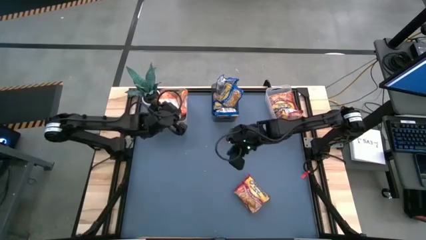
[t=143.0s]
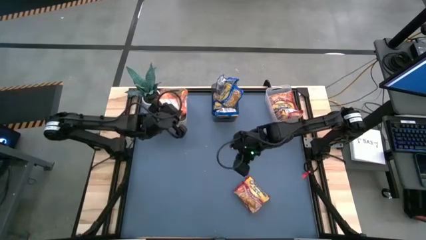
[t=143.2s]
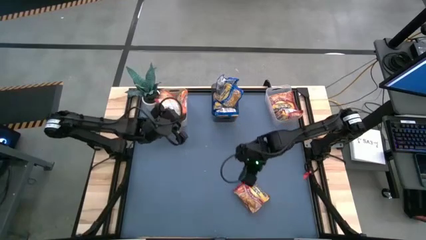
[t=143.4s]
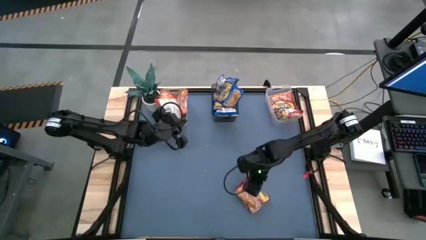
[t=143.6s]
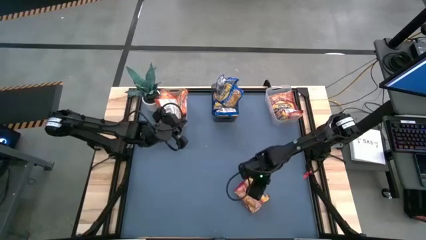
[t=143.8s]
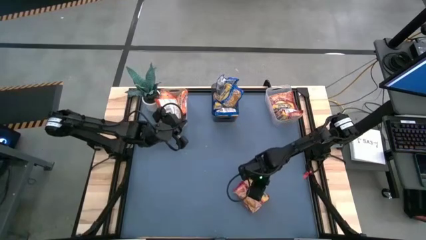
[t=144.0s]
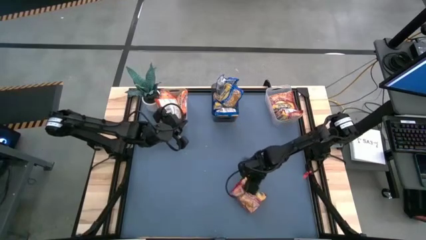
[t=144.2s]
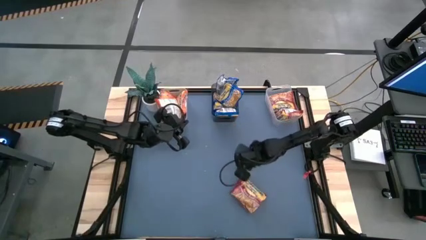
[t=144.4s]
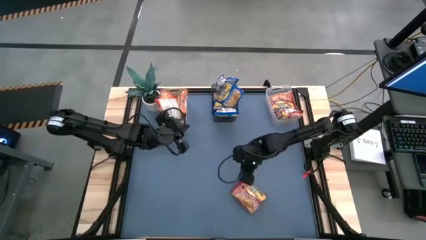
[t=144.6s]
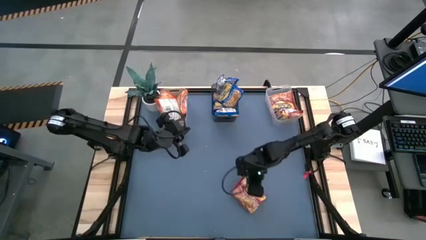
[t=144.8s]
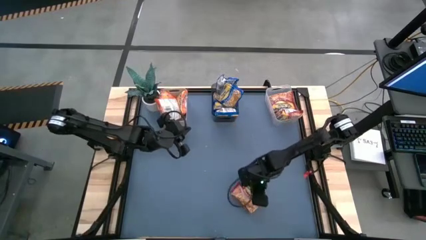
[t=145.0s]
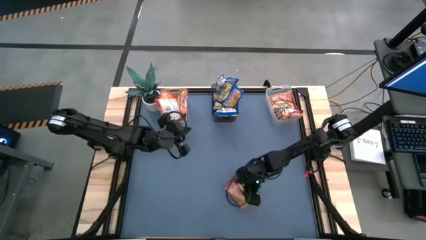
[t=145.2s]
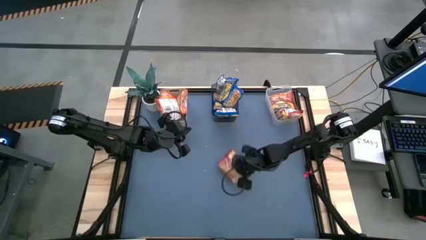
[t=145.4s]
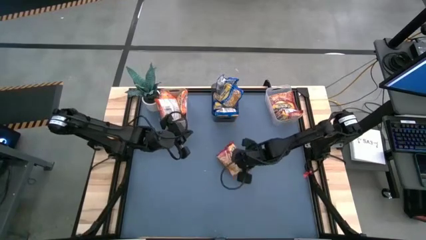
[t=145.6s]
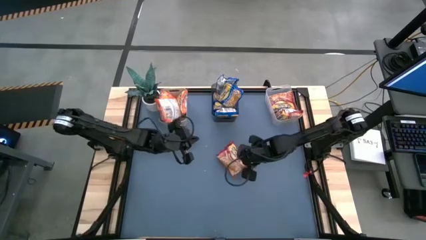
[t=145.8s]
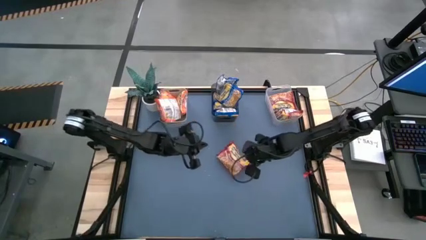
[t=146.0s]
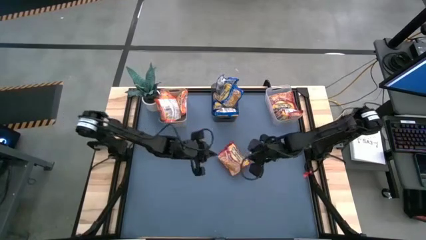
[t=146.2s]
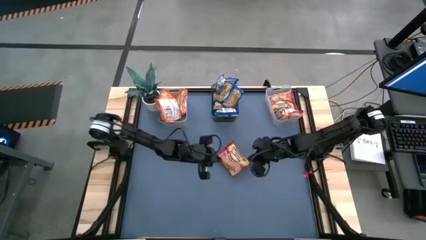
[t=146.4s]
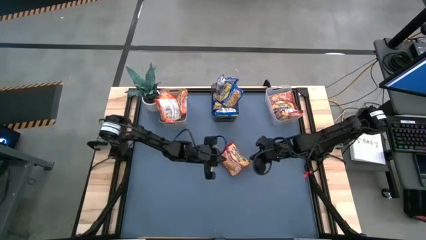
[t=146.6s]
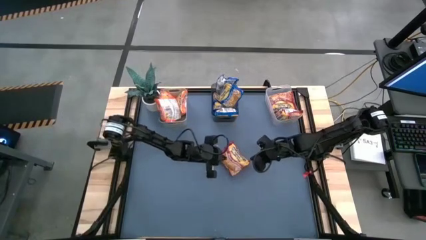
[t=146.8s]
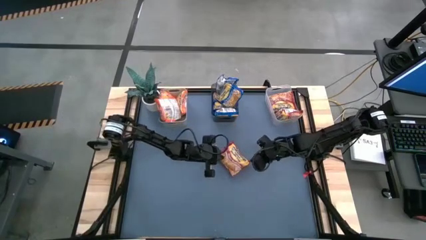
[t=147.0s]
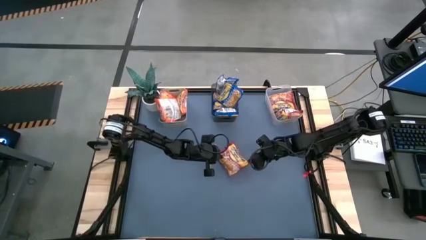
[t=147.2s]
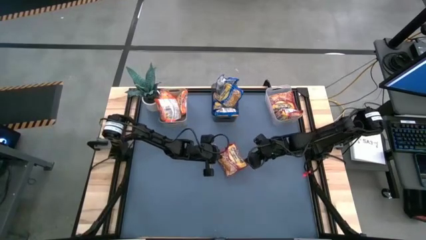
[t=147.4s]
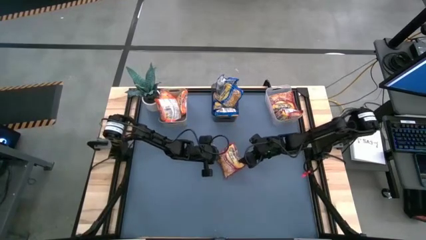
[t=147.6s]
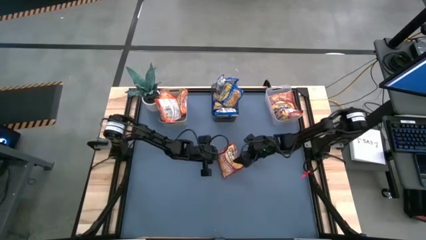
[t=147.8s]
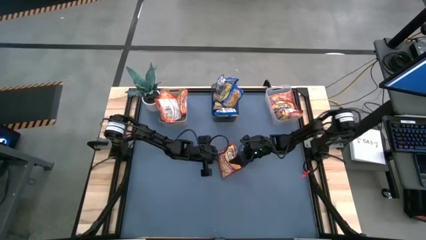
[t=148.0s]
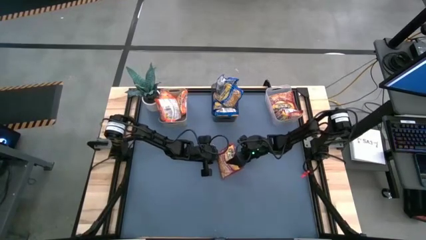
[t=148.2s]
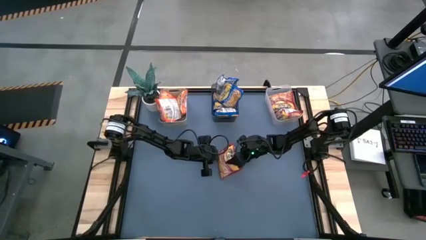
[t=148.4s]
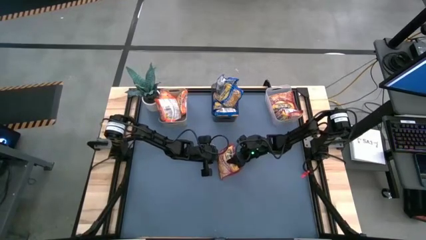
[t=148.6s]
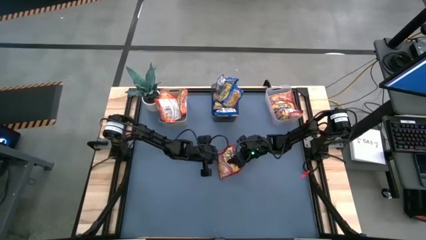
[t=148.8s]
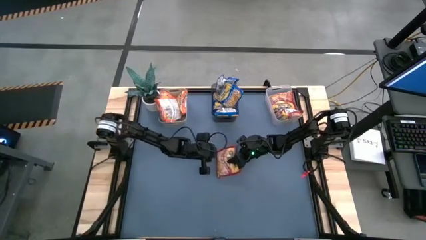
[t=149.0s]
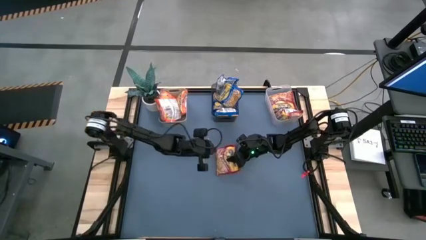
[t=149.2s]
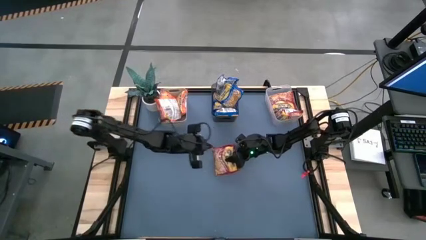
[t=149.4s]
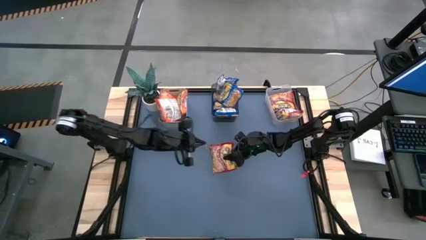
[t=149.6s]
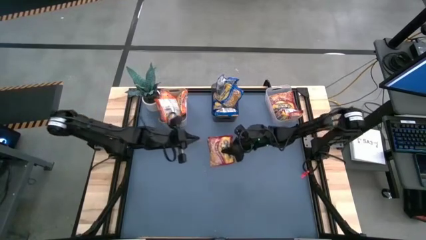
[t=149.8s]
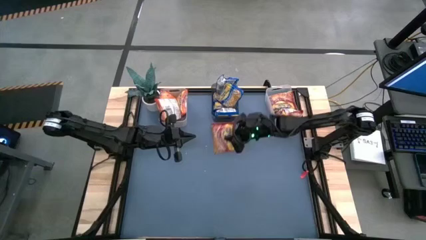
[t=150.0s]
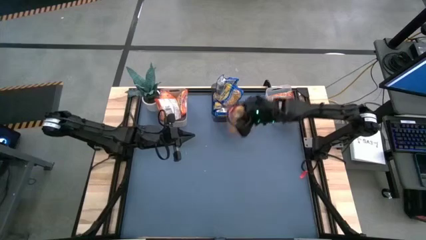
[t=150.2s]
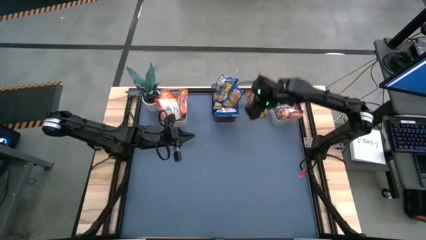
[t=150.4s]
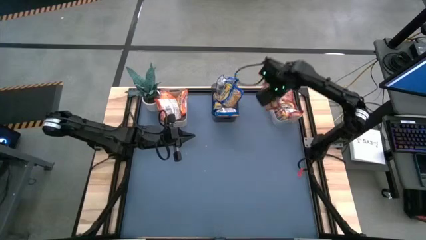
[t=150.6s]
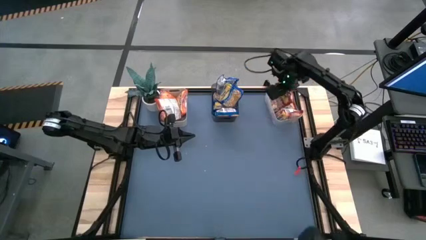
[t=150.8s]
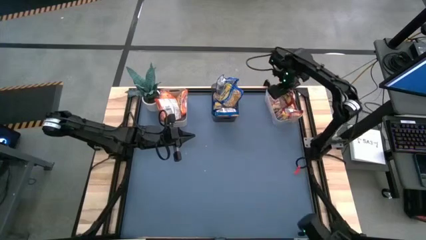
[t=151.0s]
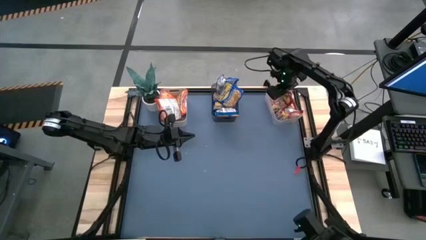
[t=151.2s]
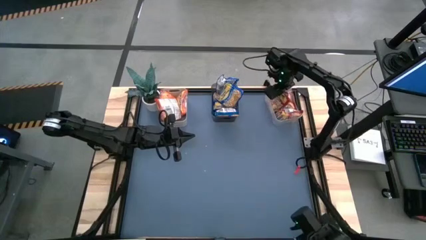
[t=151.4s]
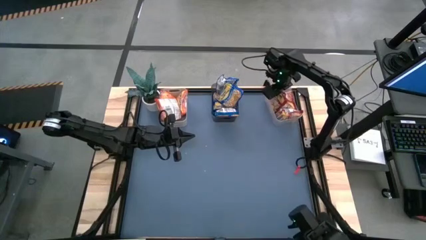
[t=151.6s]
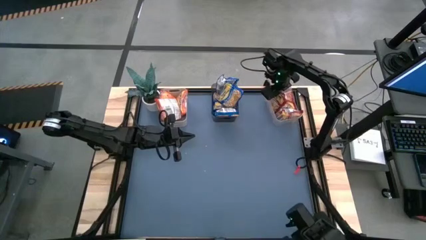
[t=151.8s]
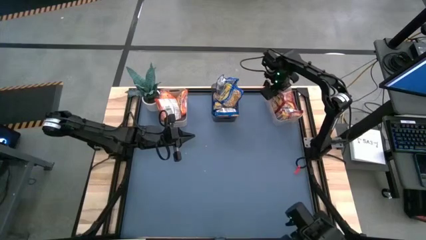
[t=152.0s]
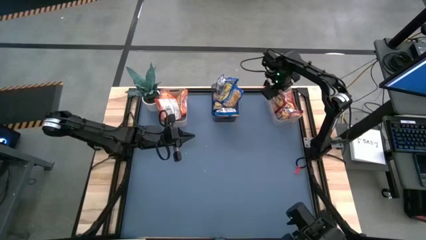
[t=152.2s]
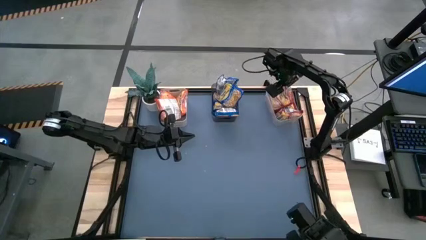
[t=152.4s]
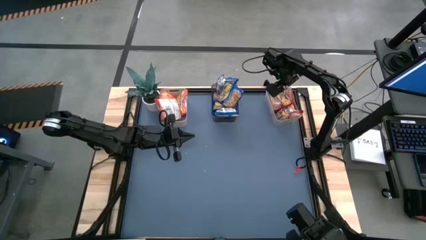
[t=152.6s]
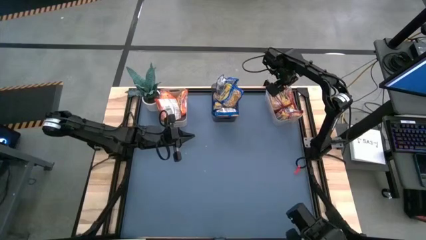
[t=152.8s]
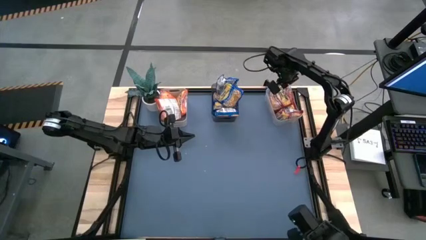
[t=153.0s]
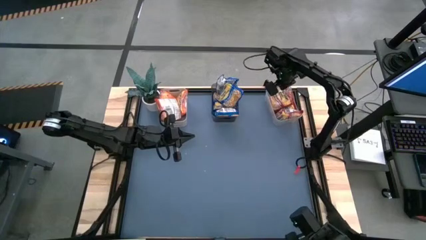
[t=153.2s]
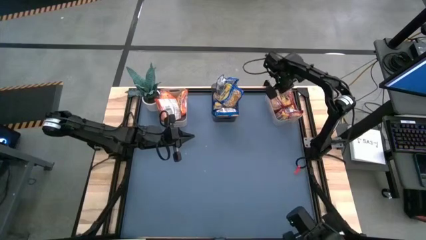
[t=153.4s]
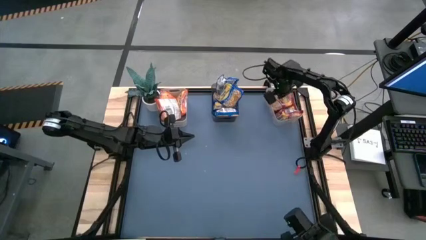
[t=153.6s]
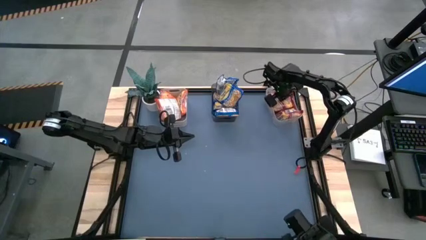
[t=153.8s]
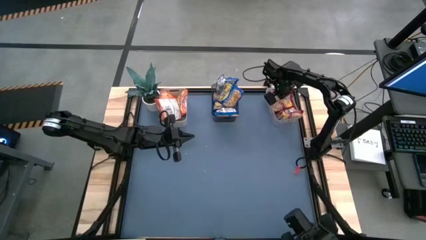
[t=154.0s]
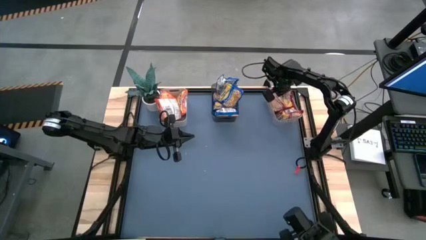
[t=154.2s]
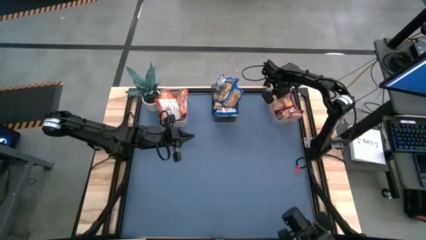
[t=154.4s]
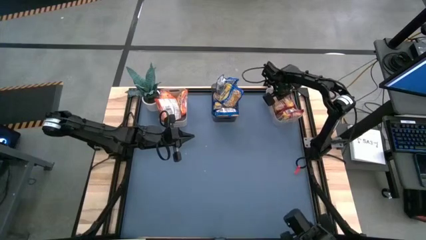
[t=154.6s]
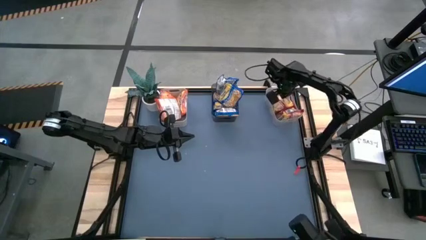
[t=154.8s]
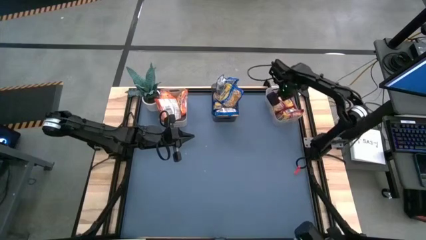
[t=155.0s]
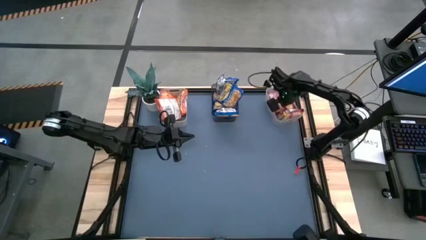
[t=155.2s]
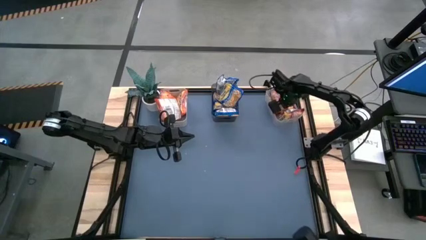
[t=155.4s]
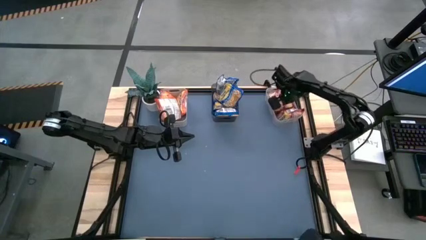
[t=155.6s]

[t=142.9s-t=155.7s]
Task: Sort Maruchan noodles
Put the red noodle pack into the transparent bin

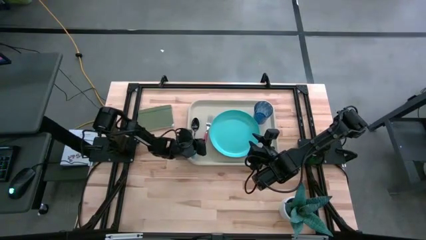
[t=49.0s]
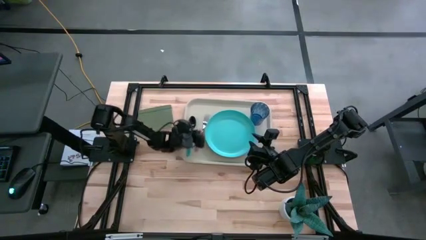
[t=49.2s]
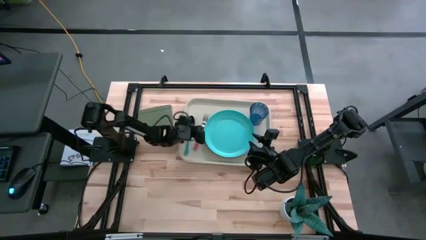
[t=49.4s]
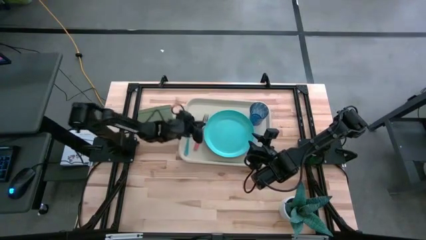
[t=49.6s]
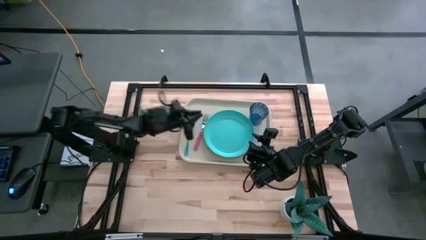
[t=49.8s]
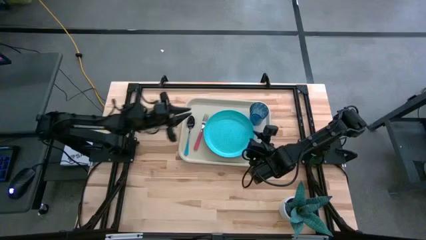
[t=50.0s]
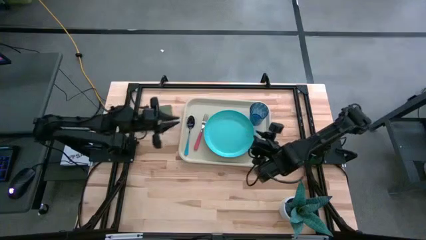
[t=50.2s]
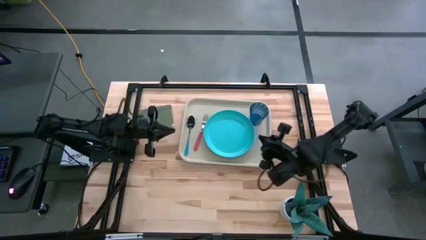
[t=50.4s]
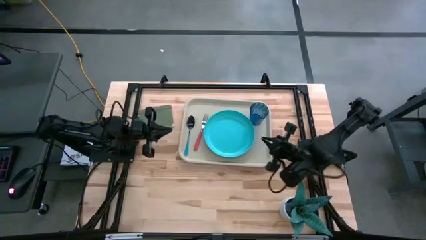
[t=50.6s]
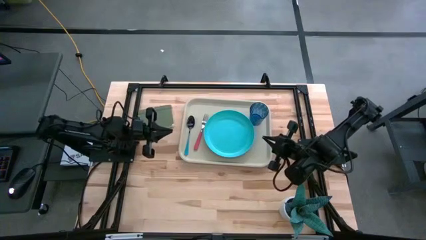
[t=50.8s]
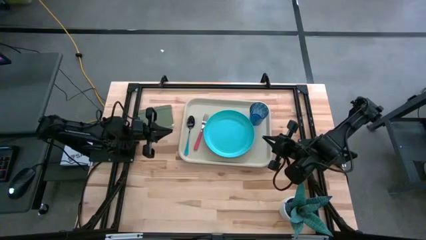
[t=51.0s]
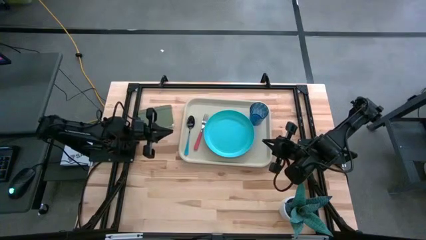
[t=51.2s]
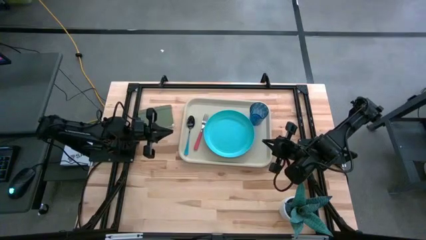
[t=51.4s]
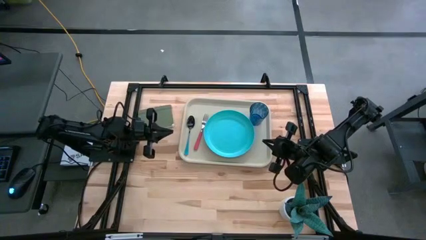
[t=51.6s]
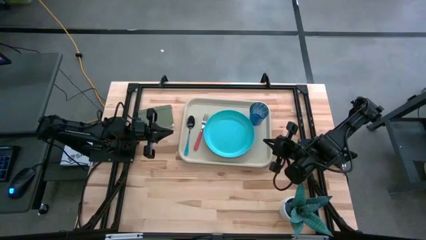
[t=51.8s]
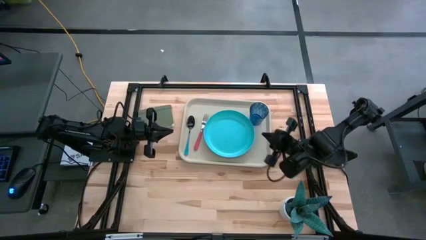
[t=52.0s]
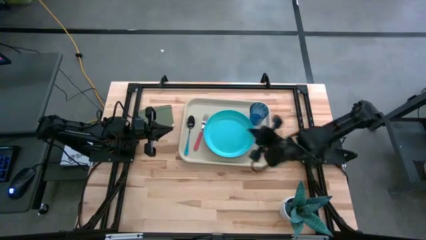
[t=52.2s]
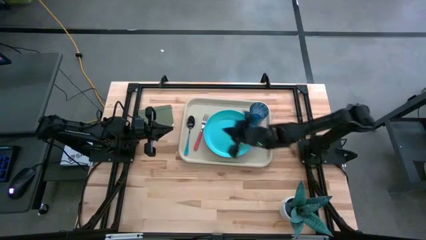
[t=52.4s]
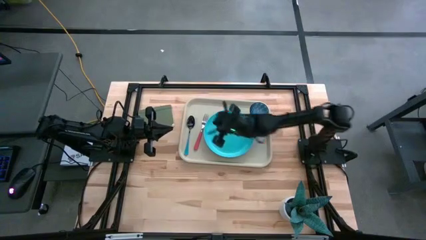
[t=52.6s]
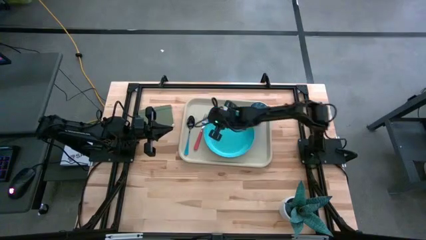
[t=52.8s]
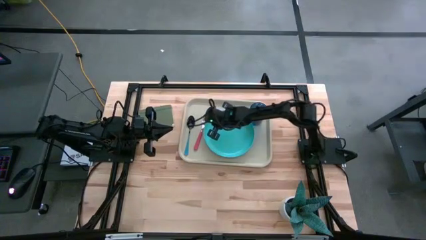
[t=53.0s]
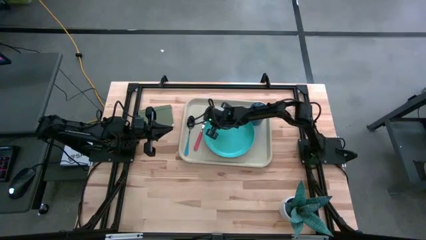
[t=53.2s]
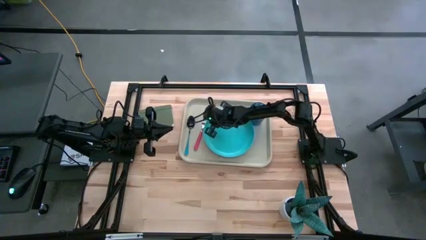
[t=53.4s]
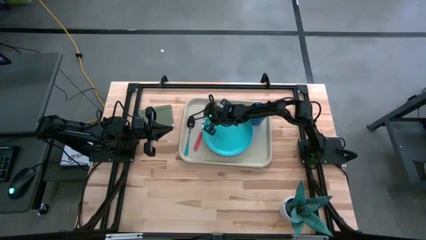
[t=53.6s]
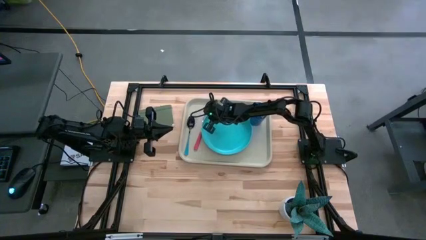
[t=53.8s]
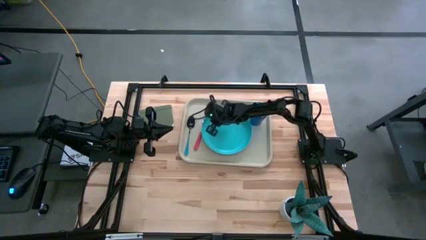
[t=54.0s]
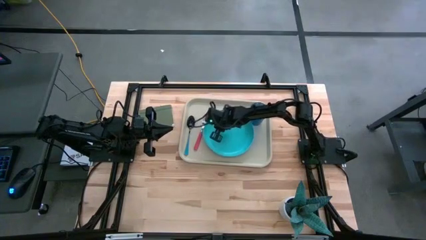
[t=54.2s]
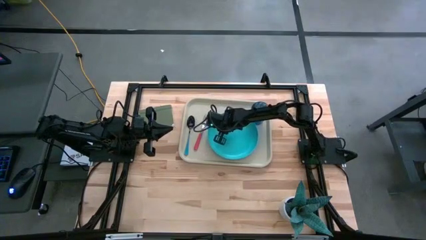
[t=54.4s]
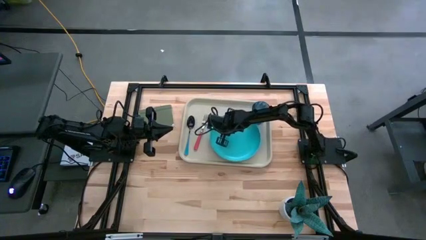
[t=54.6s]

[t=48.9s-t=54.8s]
Task: Pick and place plate/cup/fork/spoon on tray
Adjust the blue plate
